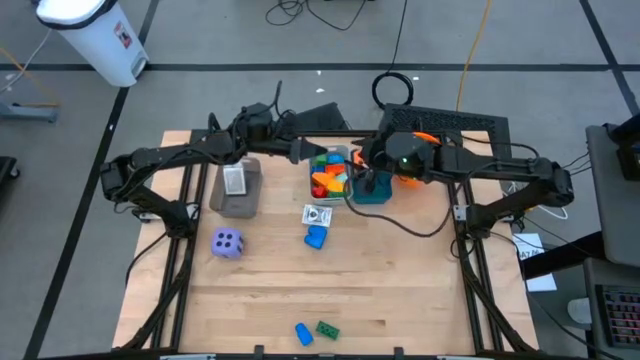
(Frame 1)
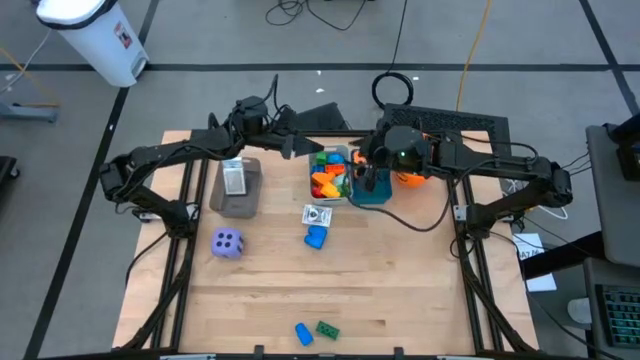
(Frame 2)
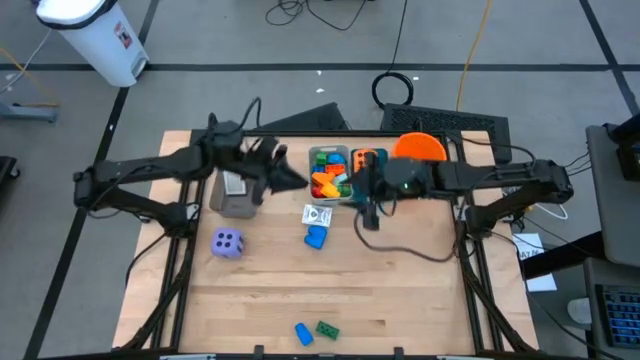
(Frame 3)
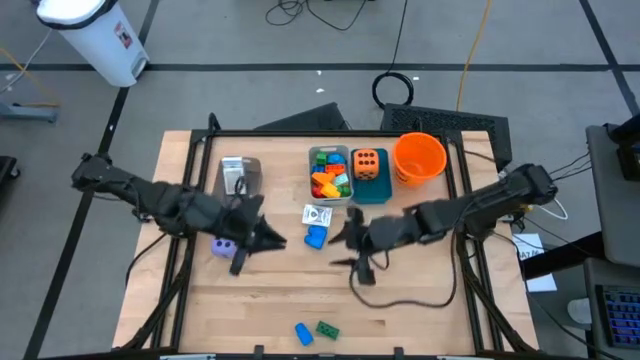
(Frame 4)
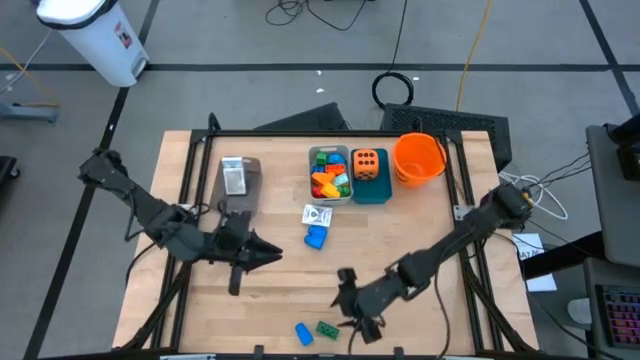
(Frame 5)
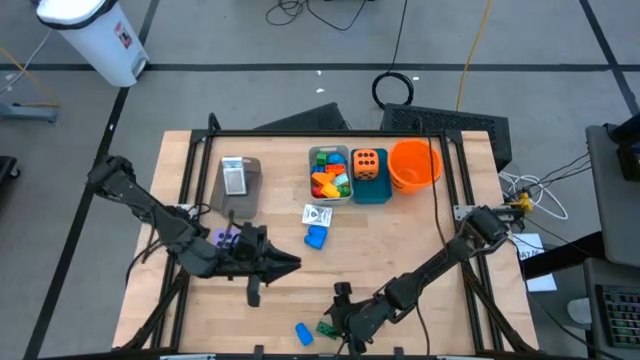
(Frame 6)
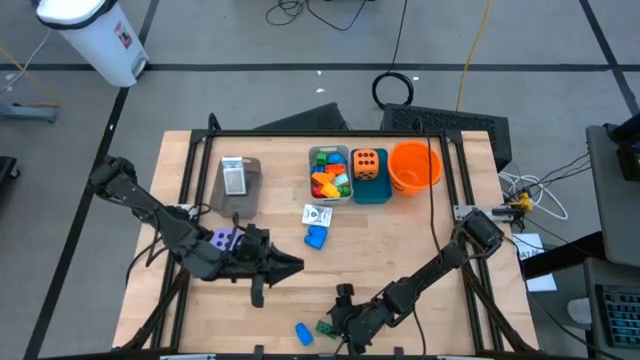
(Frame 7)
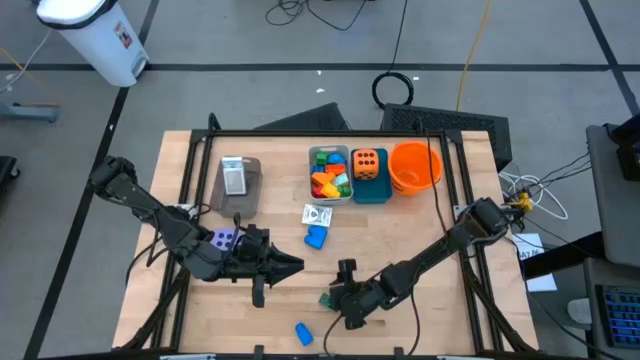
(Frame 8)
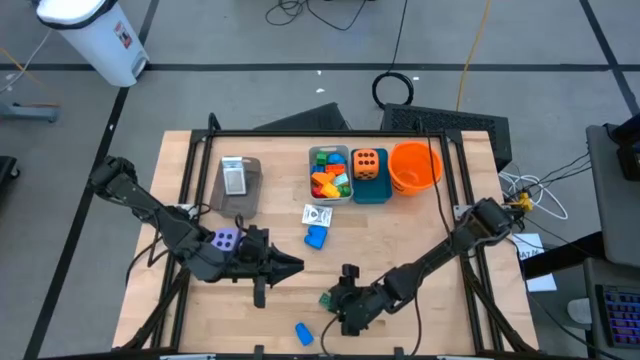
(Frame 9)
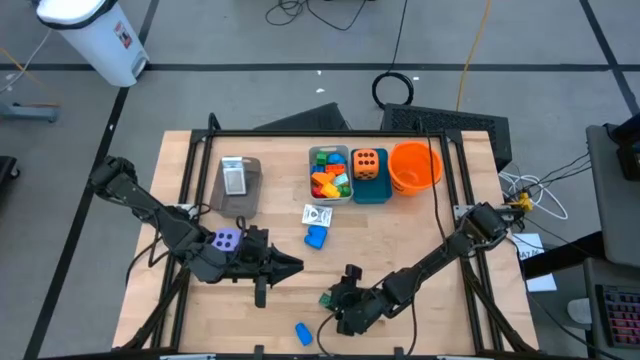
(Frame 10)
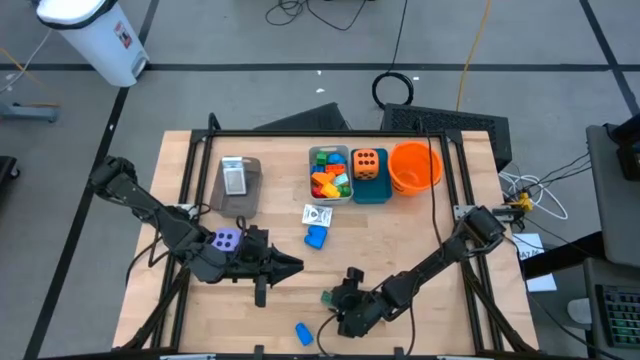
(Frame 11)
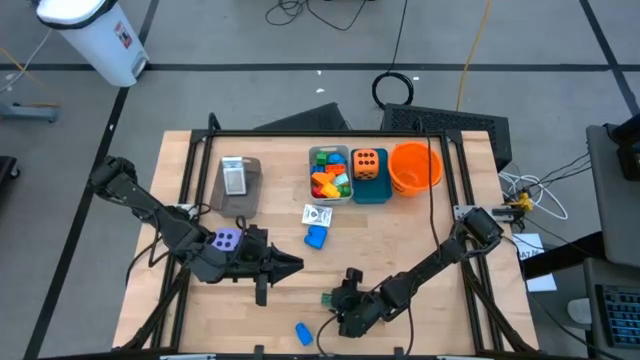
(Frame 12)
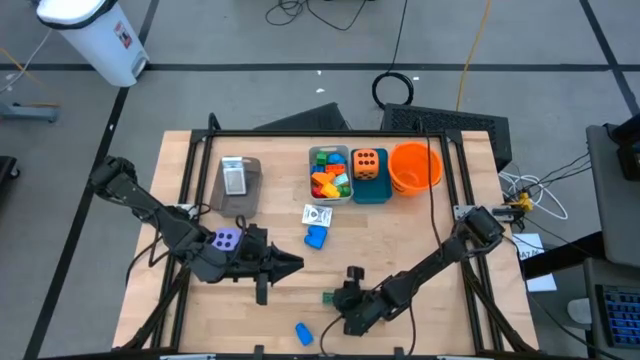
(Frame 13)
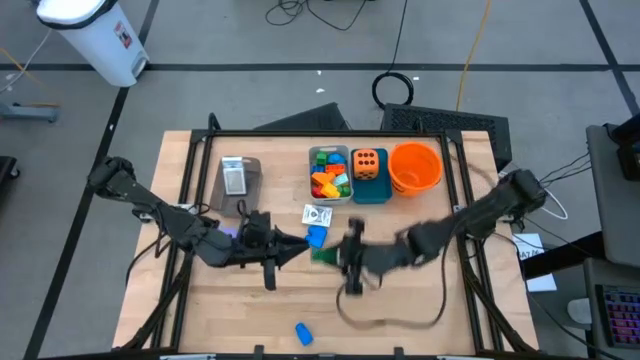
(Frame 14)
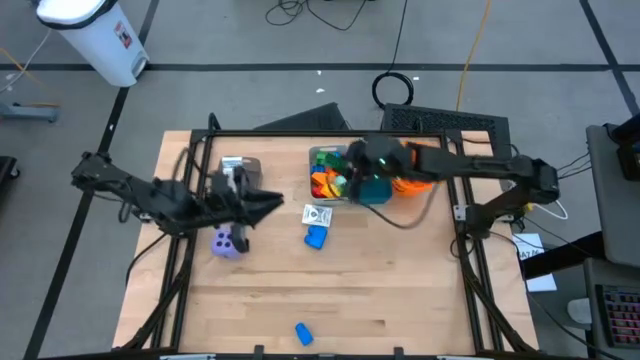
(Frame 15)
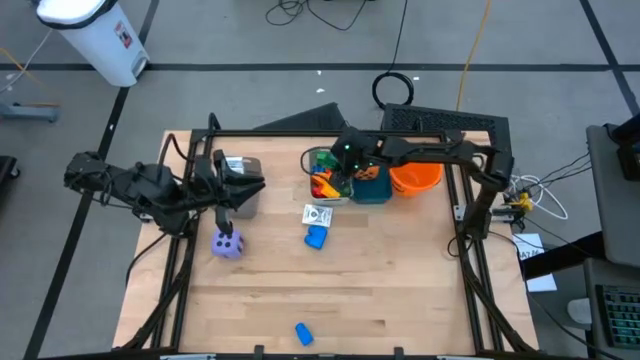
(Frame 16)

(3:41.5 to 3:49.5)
Task: Pick & Place Toys
Put the dark green game piece into the gray bin

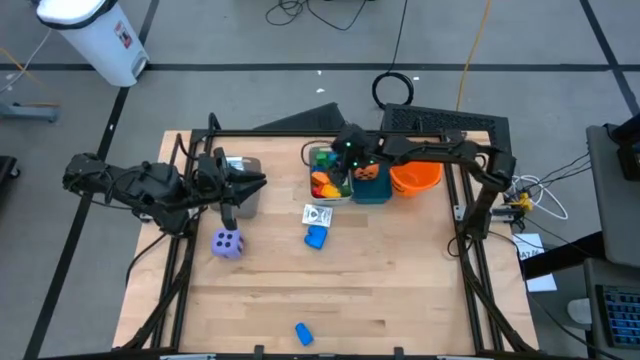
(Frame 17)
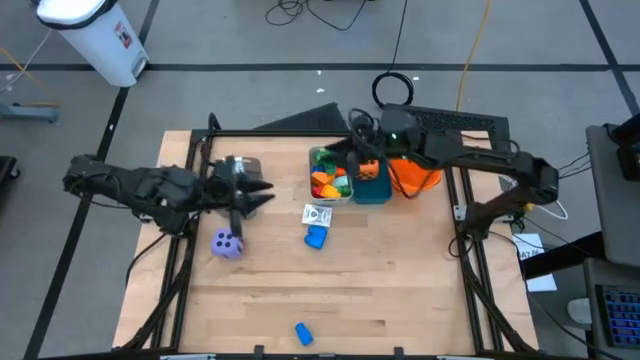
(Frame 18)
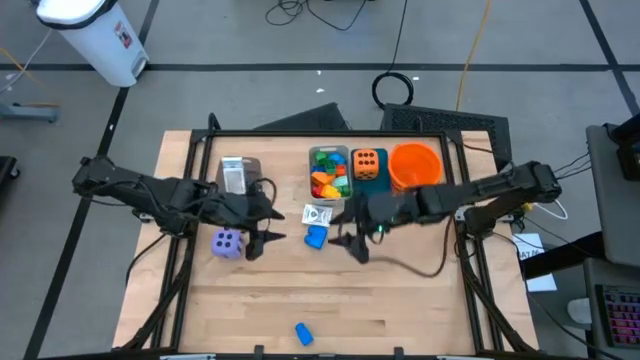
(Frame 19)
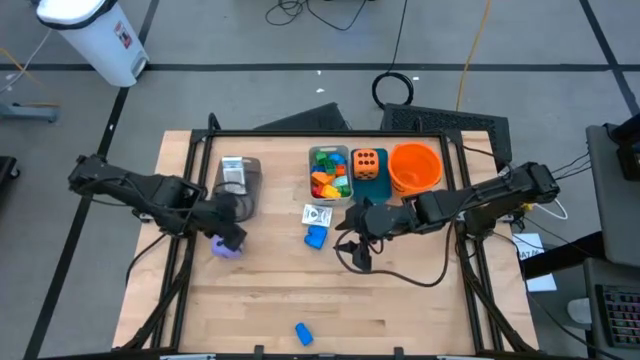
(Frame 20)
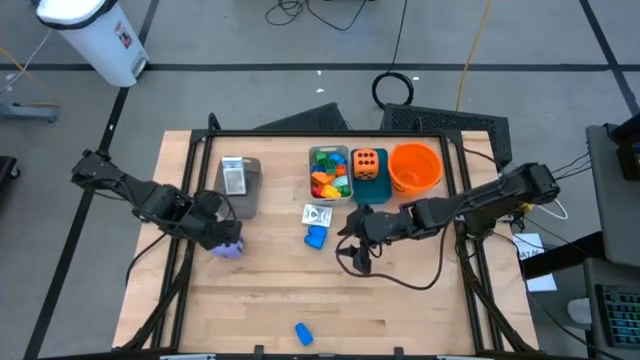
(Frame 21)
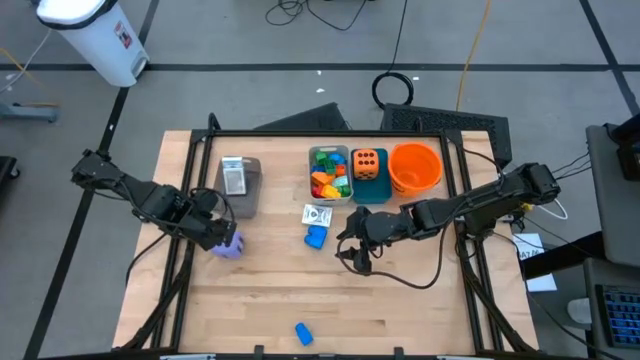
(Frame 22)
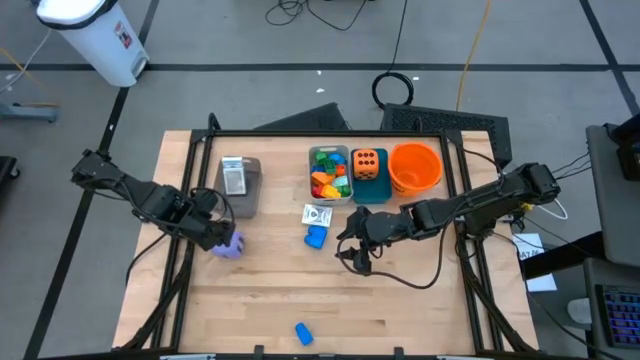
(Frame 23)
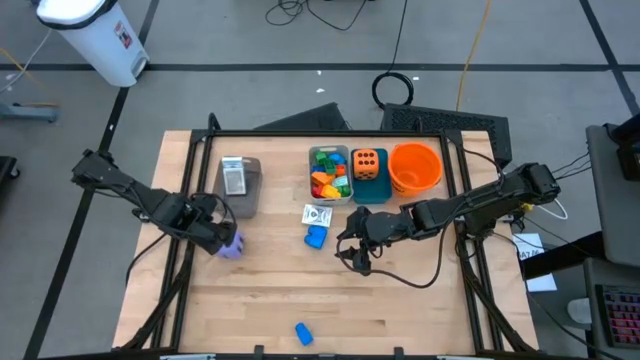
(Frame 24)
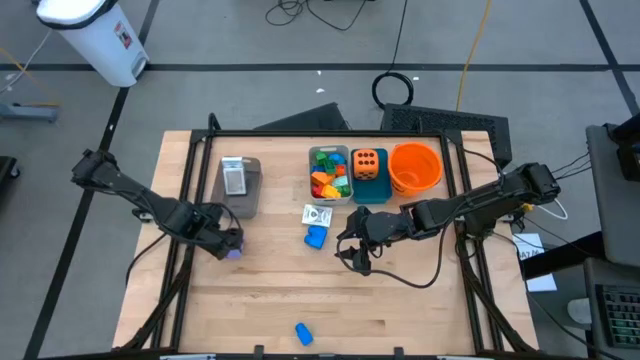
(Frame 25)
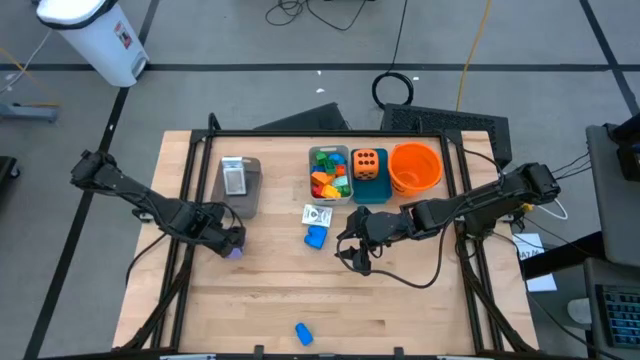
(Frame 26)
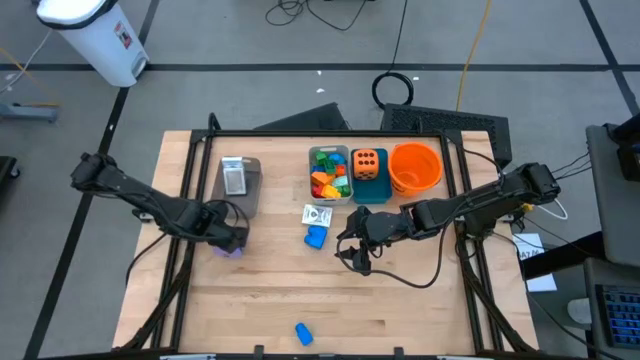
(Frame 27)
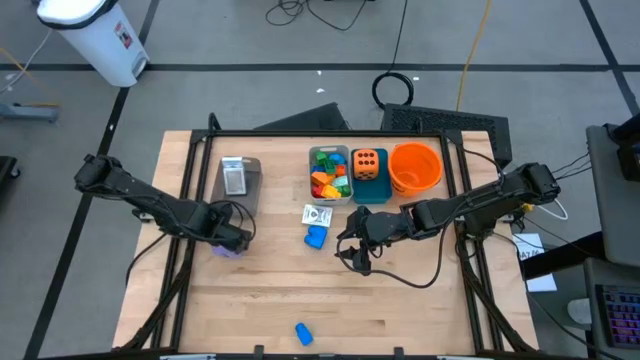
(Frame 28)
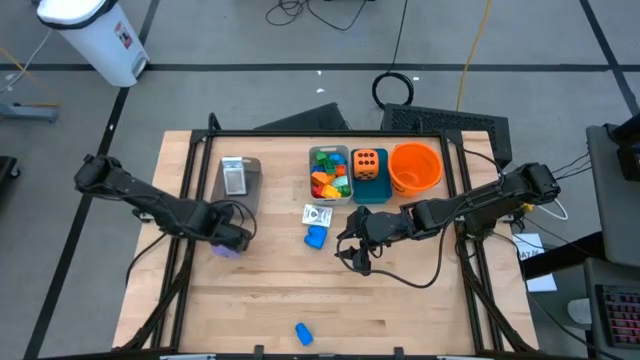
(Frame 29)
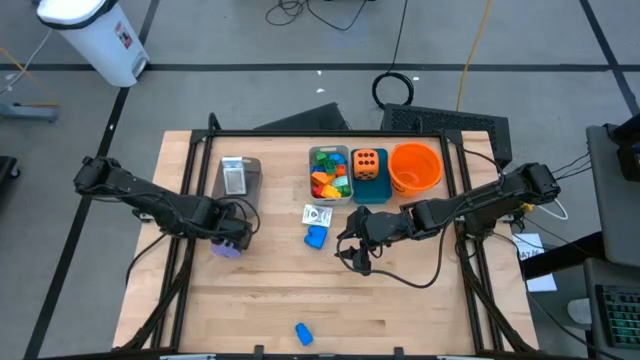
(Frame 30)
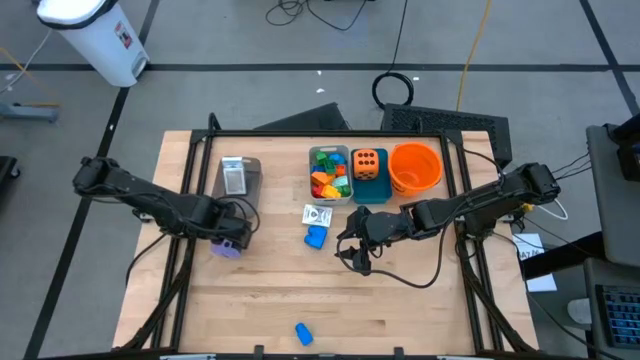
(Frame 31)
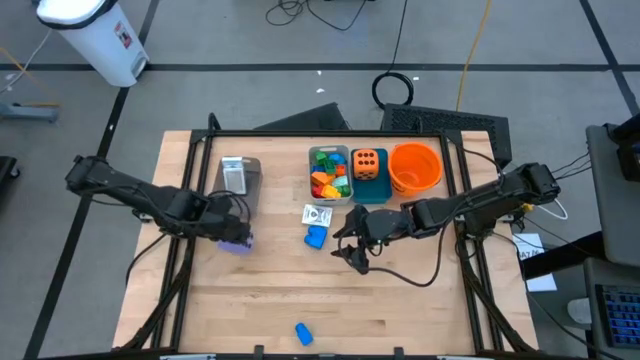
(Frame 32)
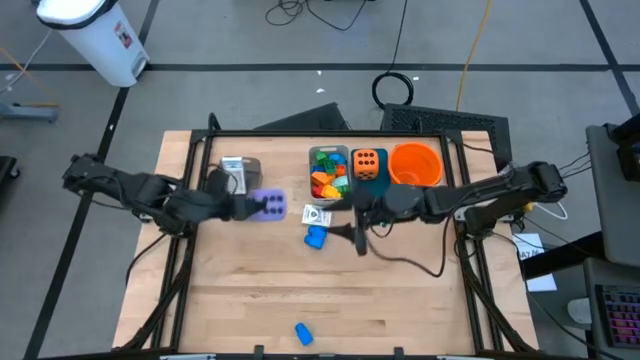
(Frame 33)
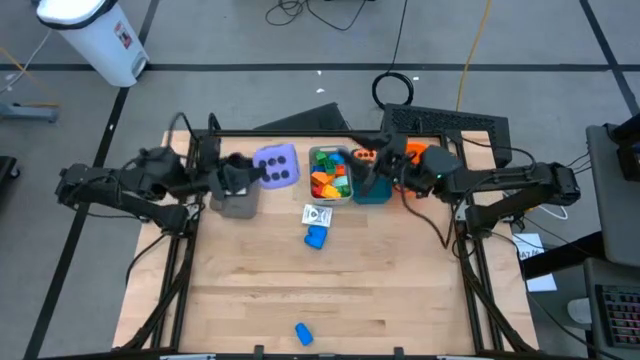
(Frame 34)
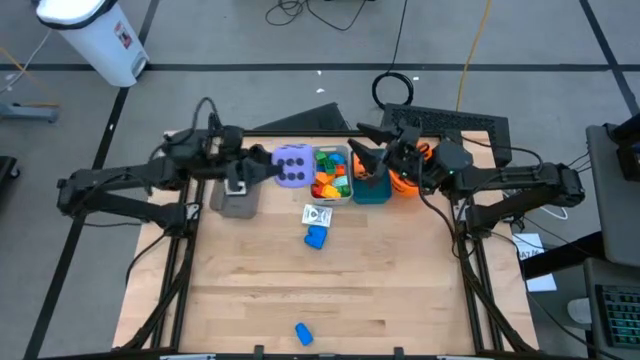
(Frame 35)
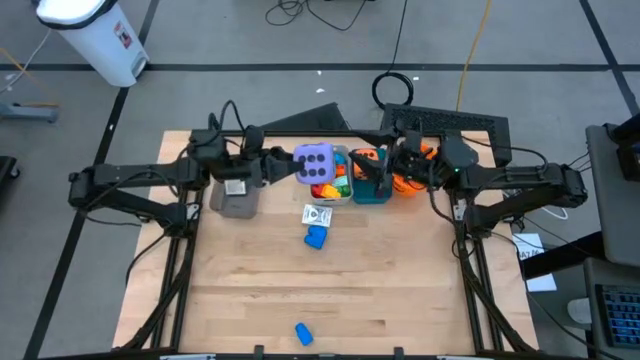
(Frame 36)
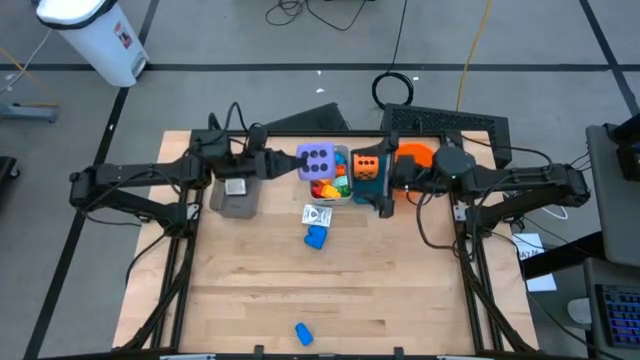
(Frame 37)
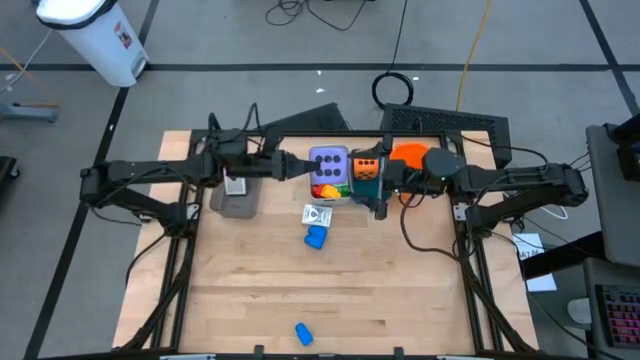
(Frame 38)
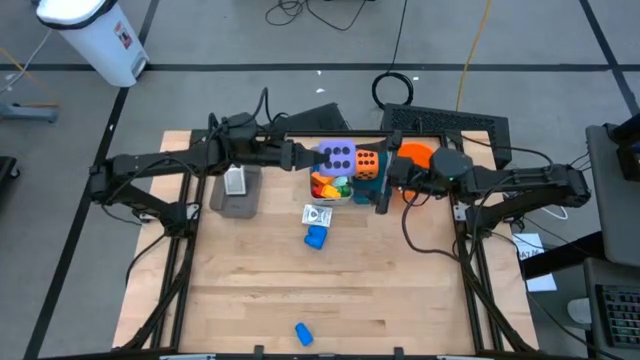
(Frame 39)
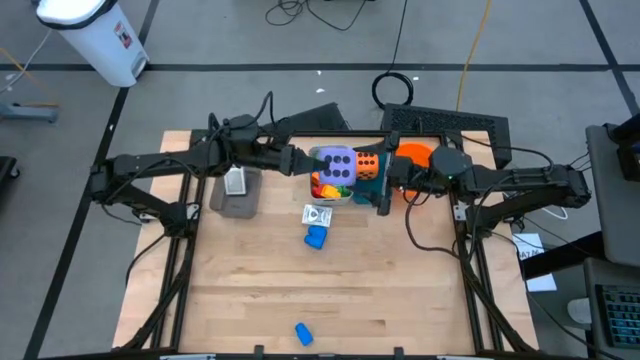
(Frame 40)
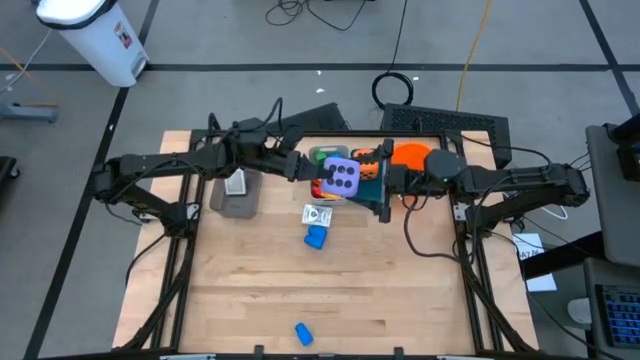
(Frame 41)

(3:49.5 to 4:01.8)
Put the purple dice into the blue bin
